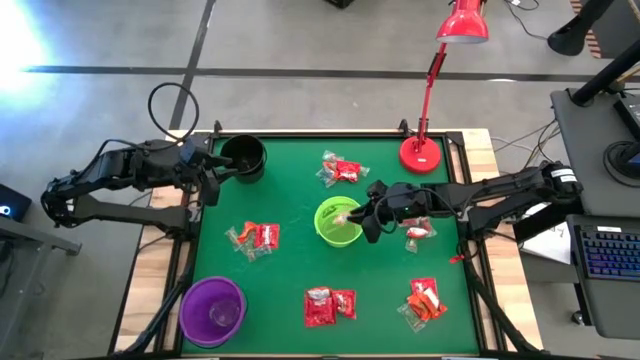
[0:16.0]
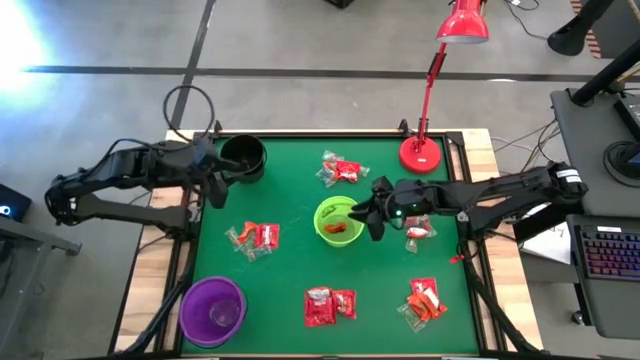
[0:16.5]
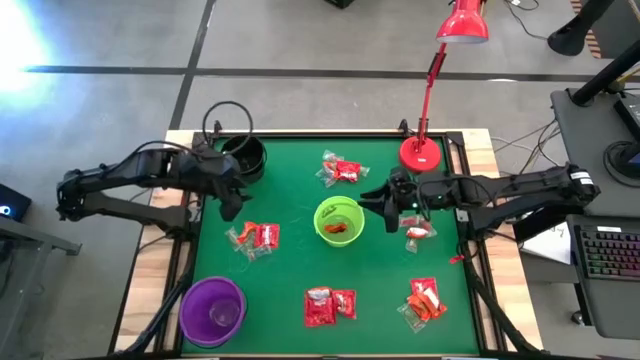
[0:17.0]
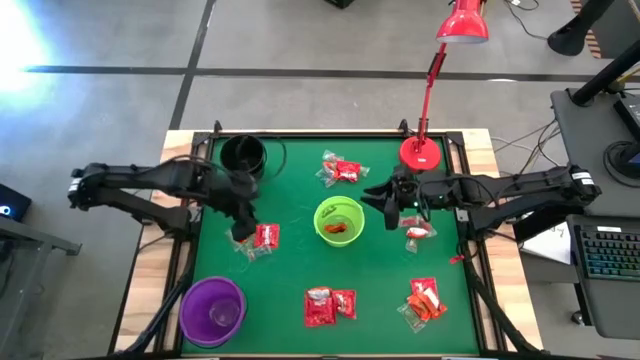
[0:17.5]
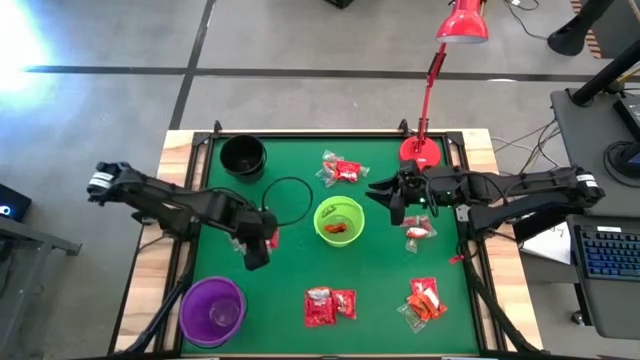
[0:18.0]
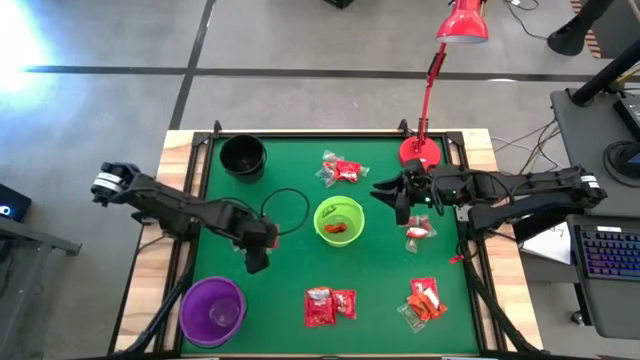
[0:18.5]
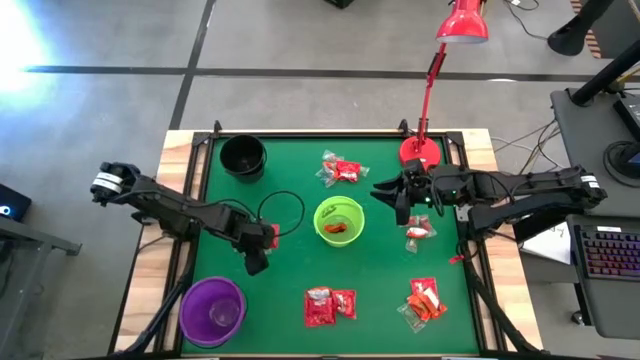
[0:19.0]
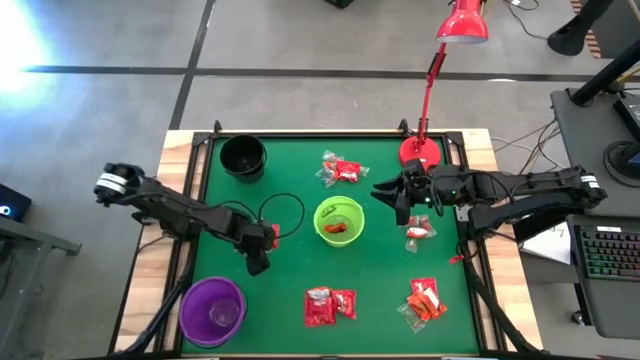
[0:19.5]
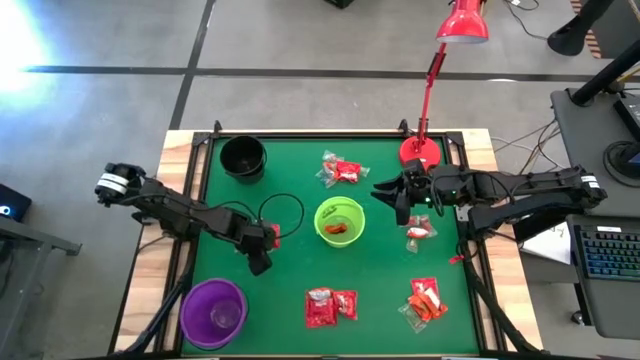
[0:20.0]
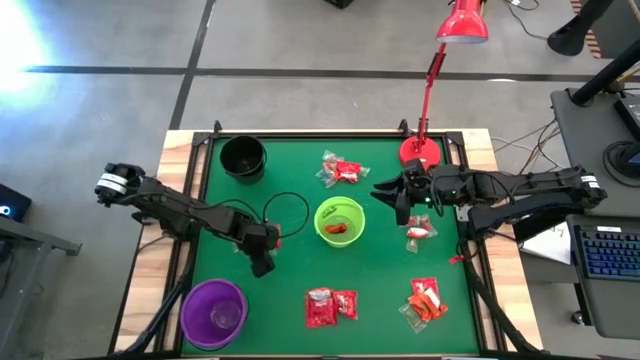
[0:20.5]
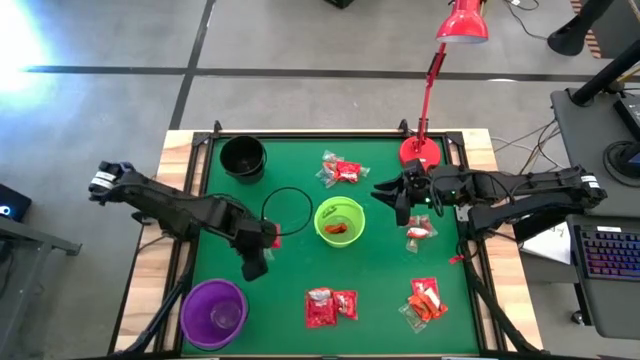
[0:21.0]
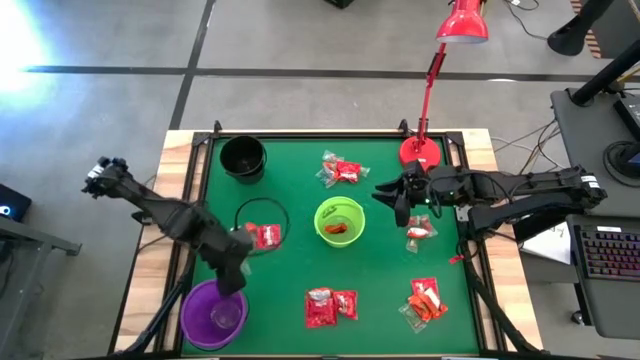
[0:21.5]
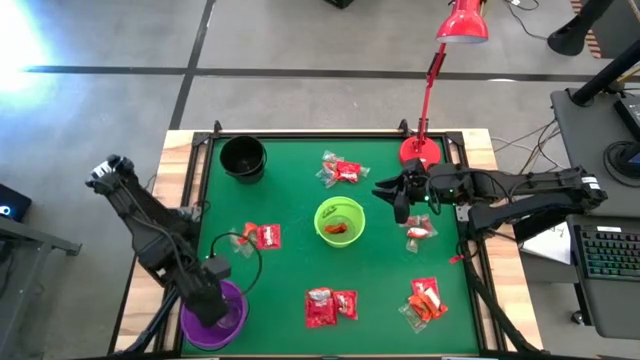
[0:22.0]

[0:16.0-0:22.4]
Task: Sort candy
Put the blue gummy into the purple bucket

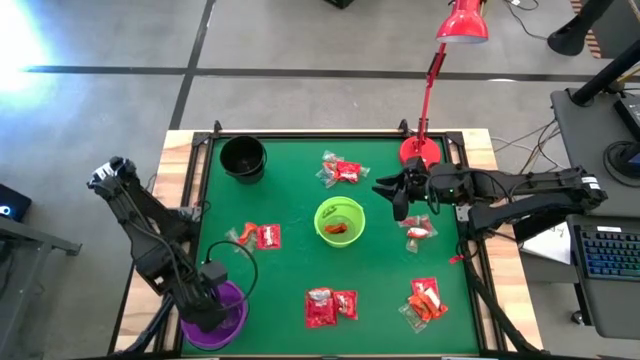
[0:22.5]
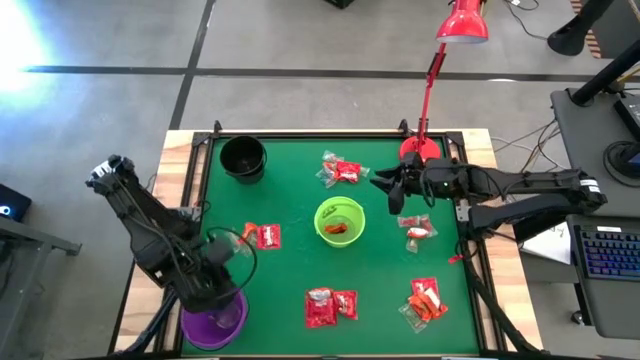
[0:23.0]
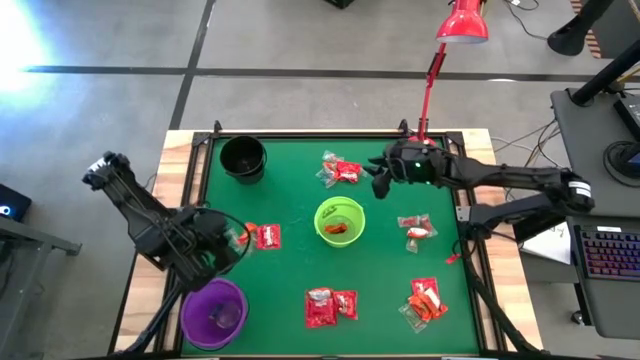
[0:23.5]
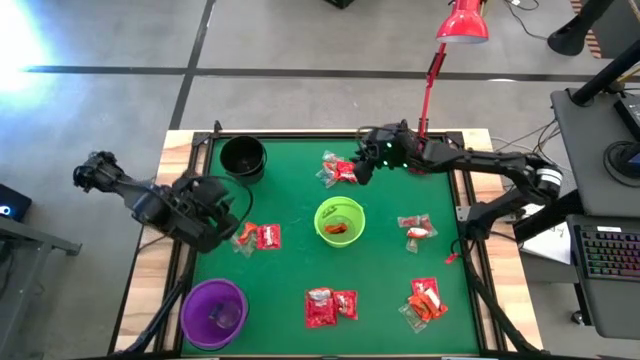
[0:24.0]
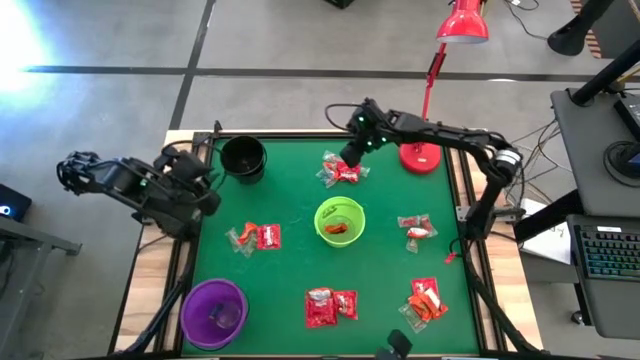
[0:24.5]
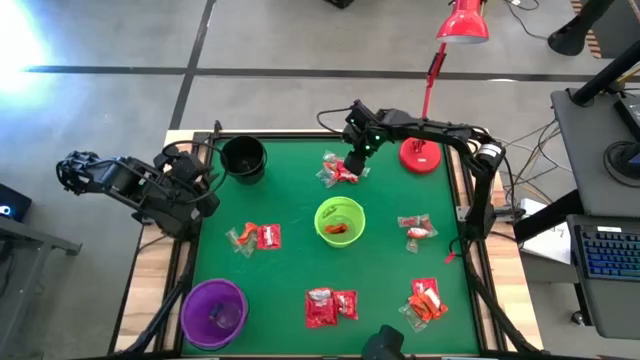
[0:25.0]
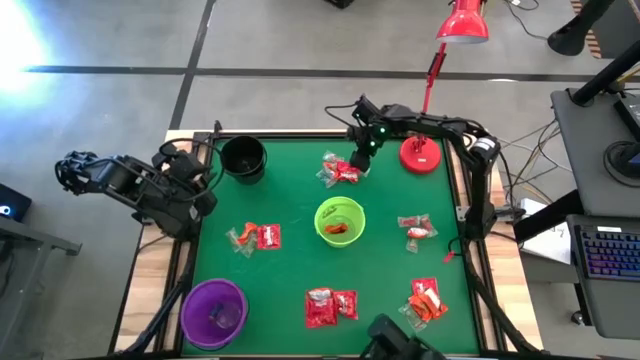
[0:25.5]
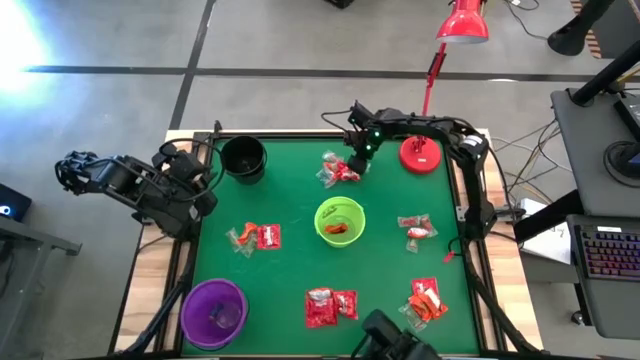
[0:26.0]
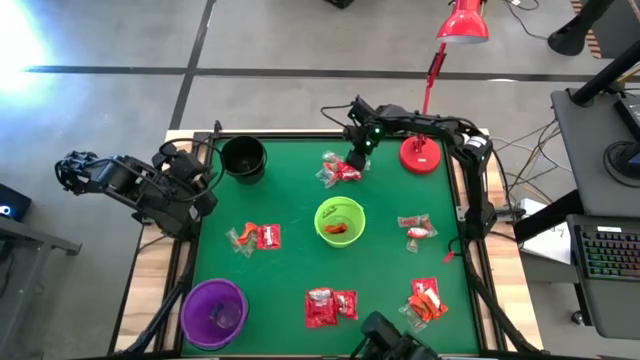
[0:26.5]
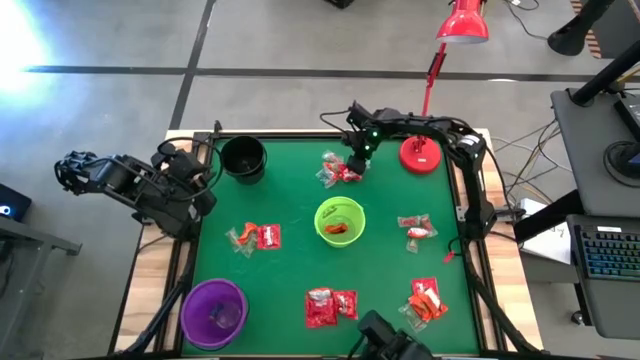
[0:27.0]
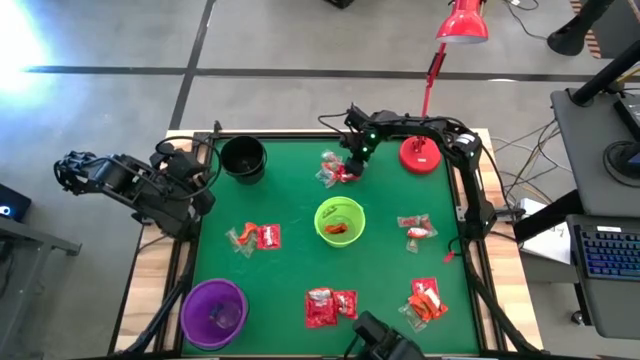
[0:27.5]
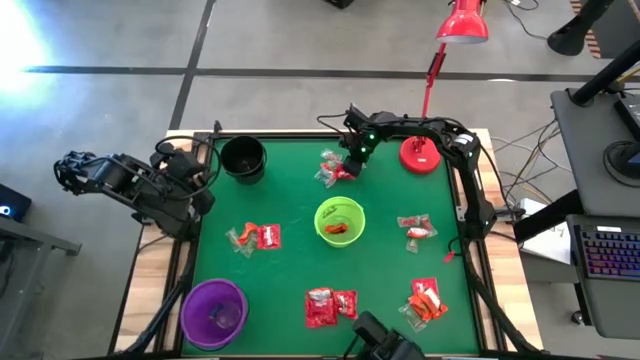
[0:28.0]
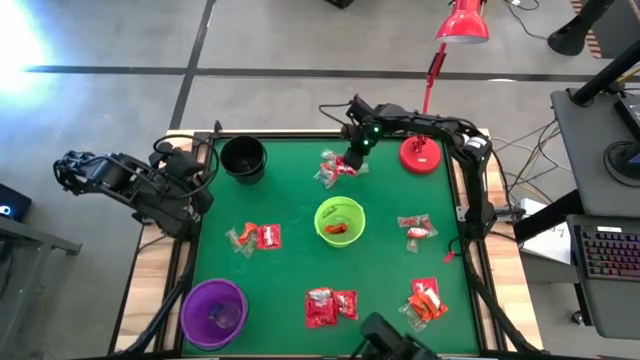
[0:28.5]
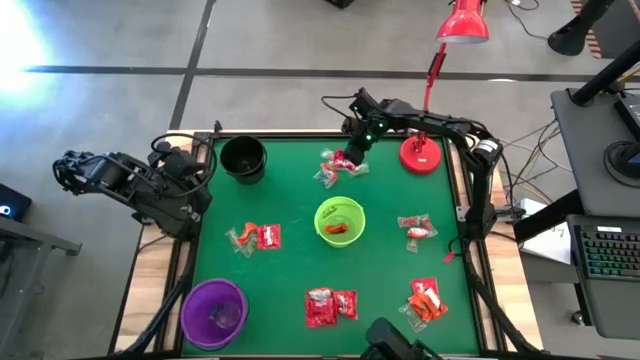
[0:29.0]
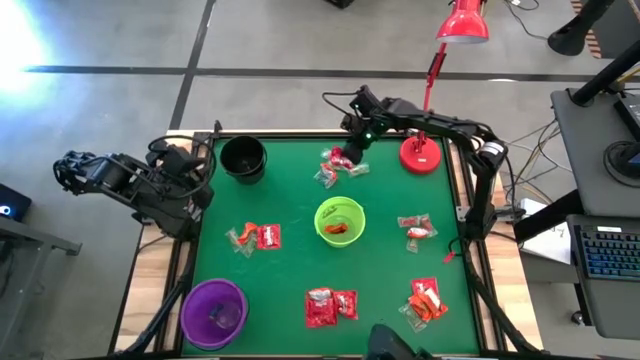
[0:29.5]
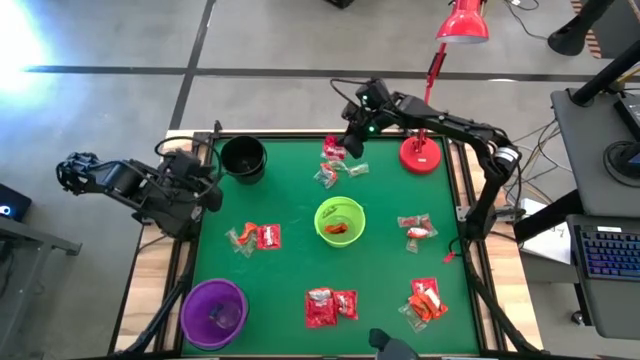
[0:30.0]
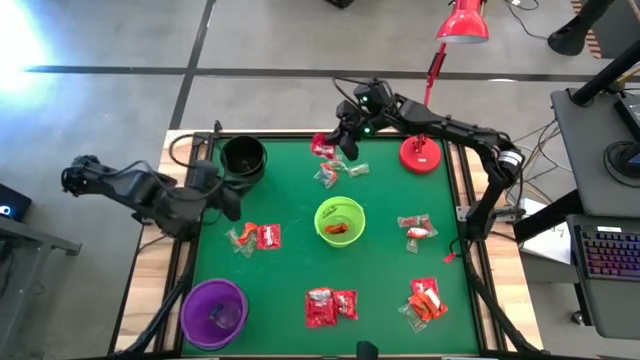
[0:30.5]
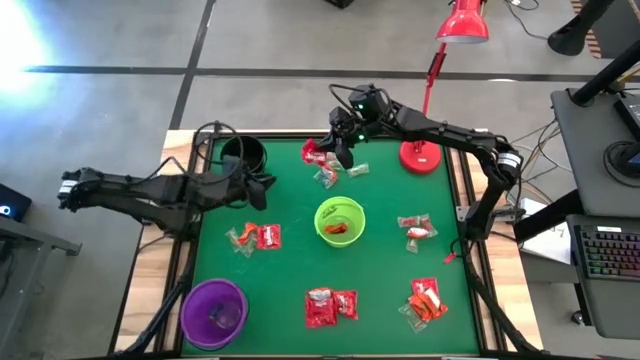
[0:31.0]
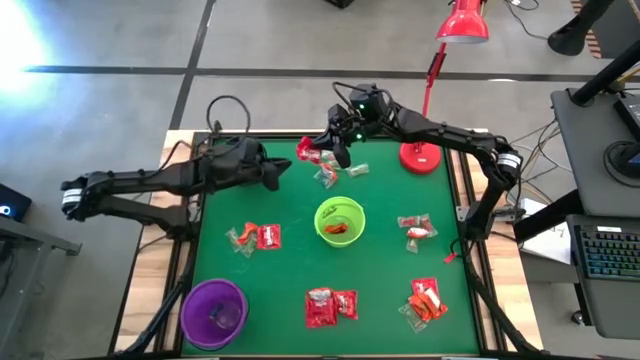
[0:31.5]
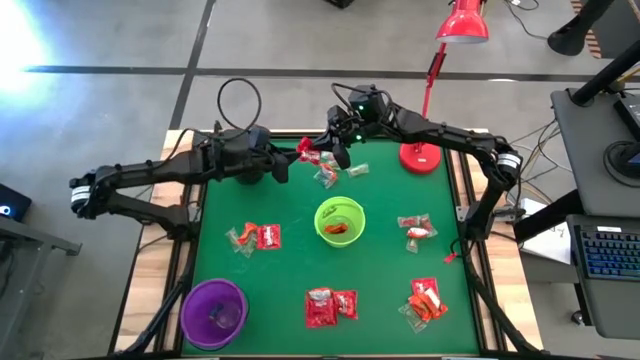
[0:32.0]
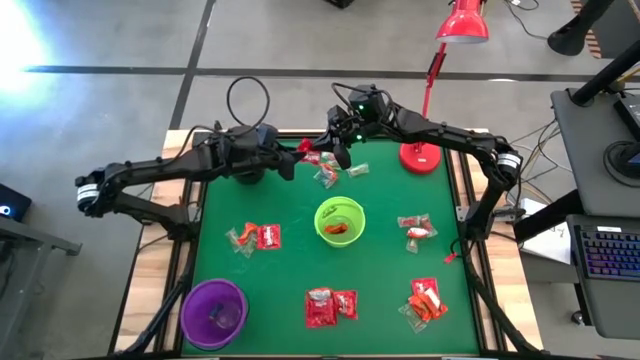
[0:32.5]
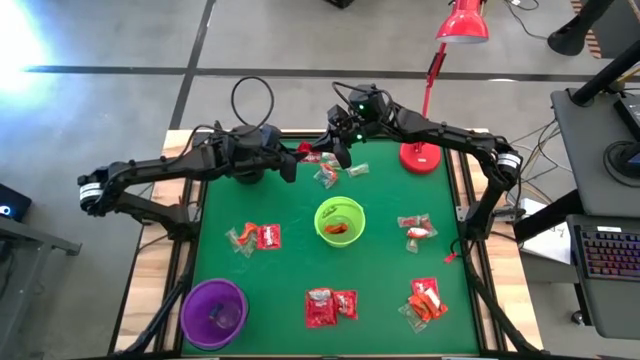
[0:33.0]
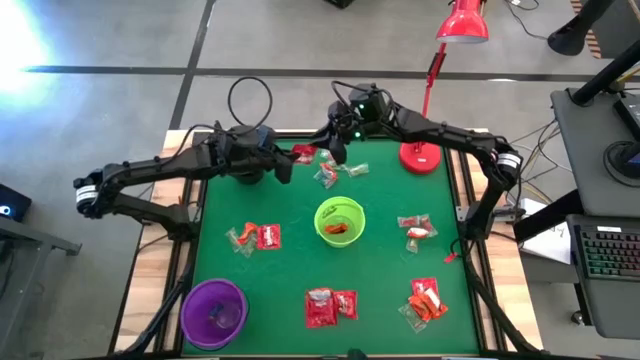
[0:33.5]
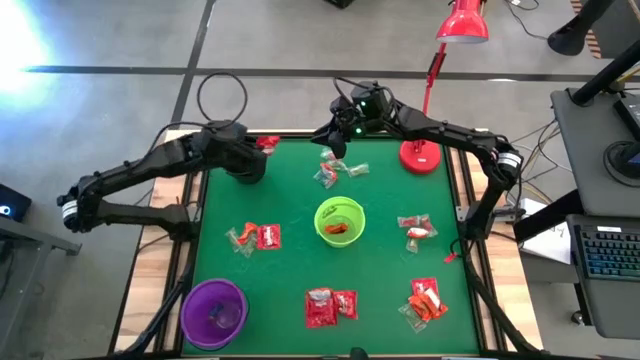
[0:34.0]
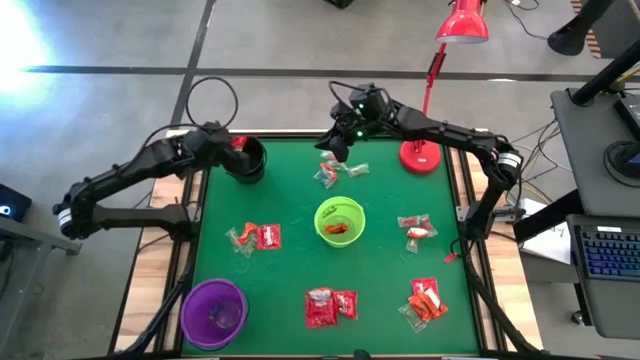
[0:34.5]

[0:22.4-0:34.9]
Put the red candy into the black bucket
